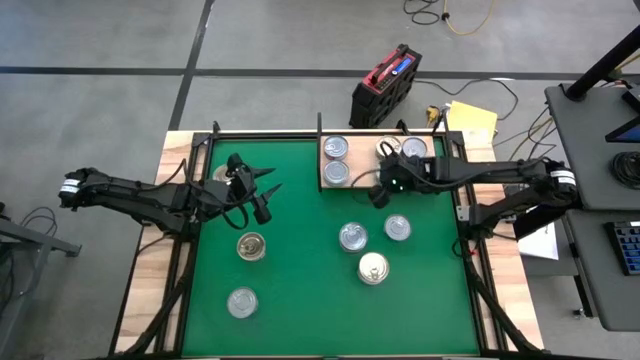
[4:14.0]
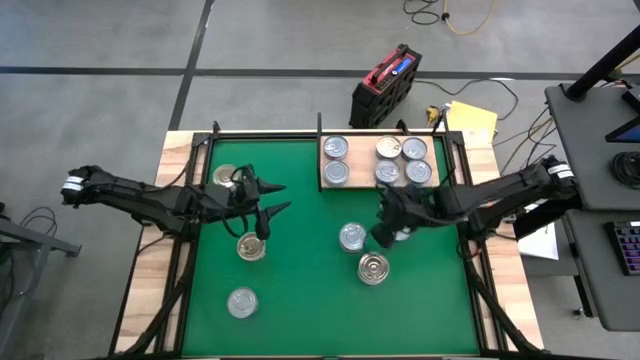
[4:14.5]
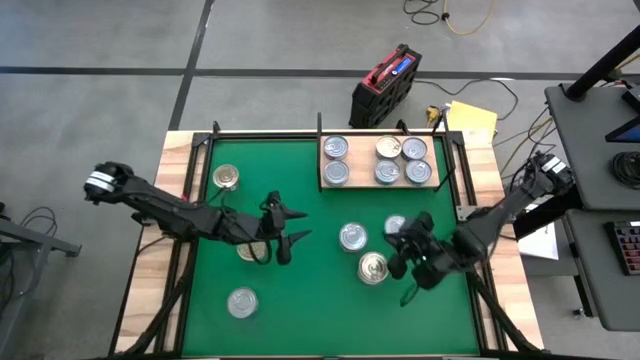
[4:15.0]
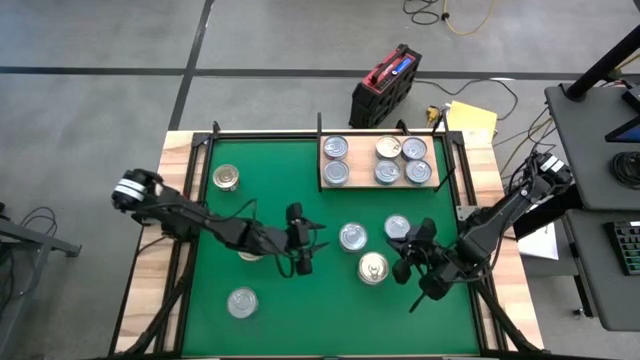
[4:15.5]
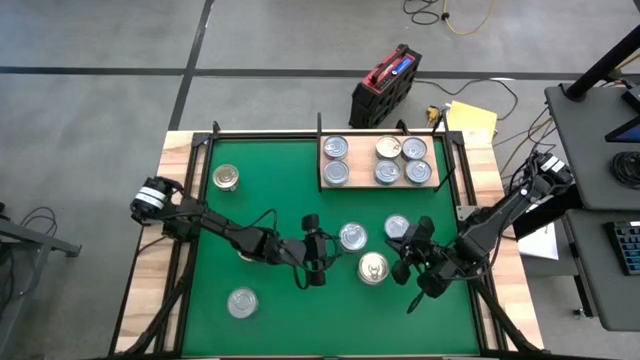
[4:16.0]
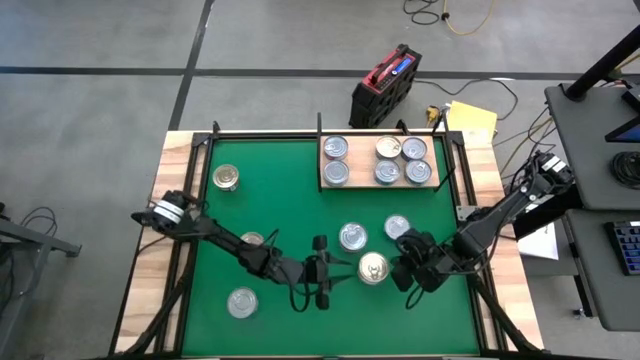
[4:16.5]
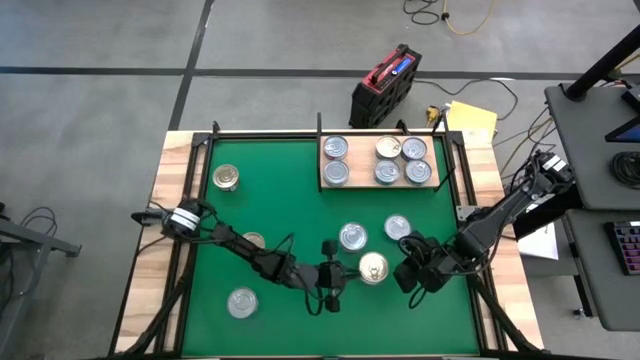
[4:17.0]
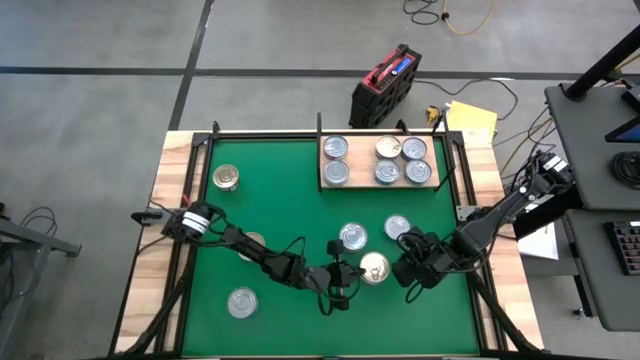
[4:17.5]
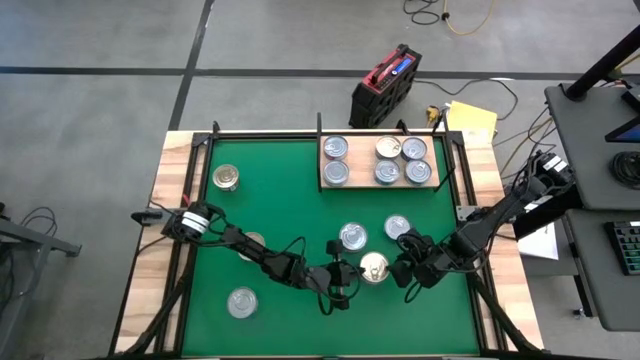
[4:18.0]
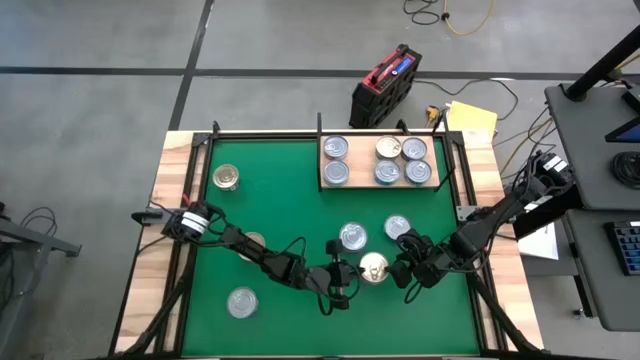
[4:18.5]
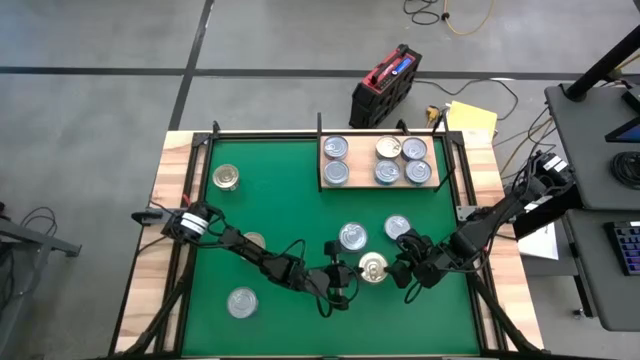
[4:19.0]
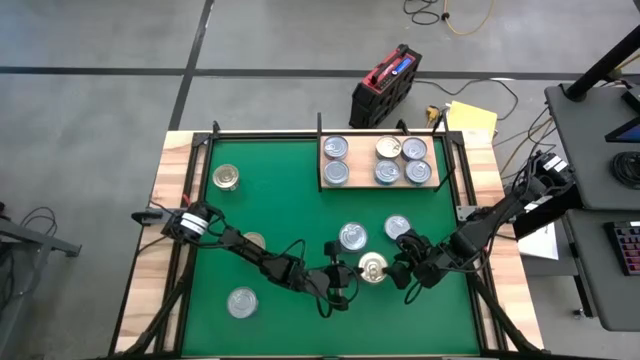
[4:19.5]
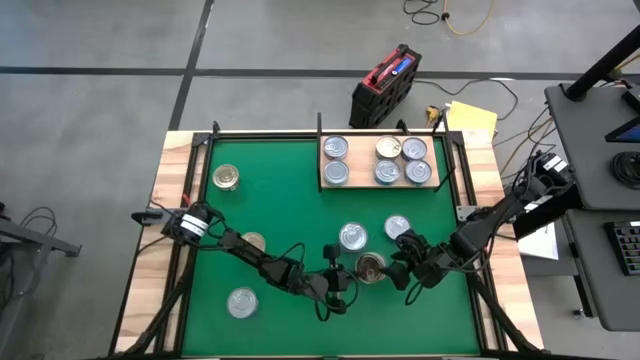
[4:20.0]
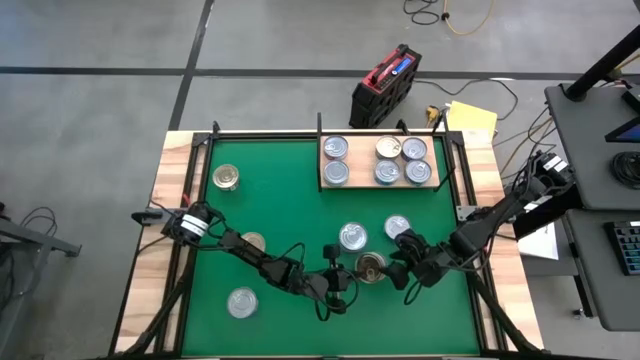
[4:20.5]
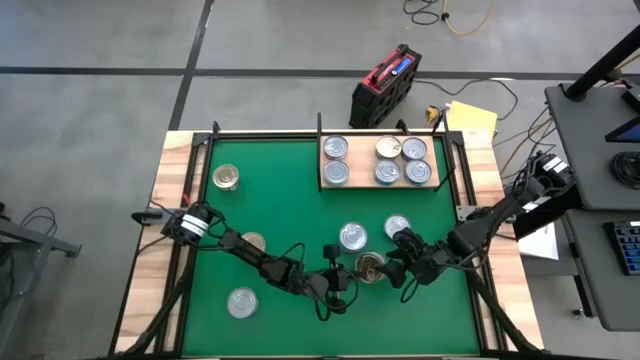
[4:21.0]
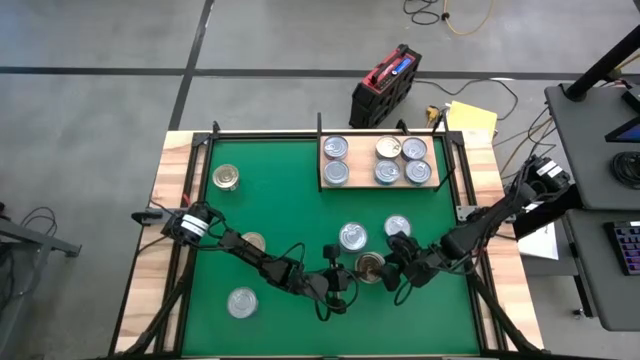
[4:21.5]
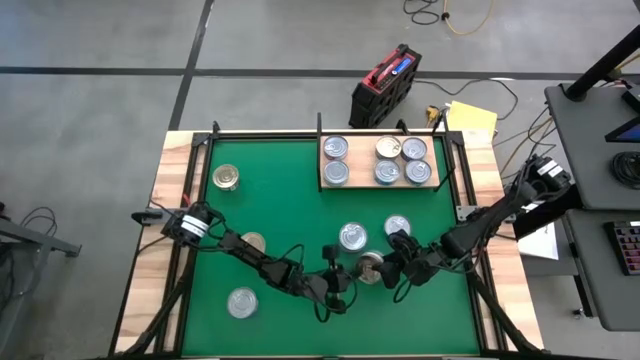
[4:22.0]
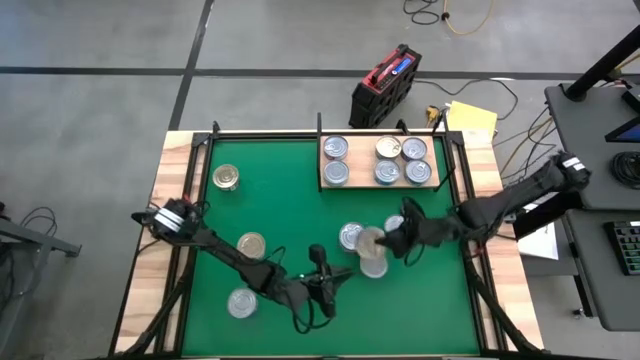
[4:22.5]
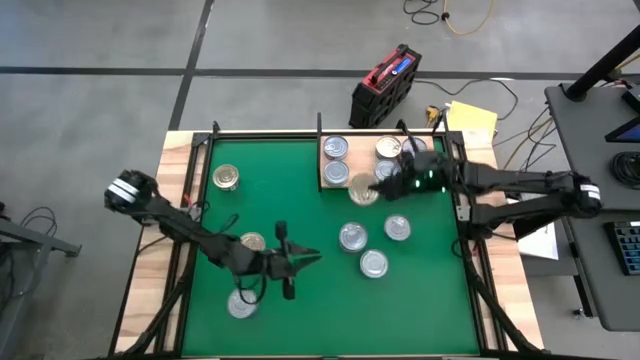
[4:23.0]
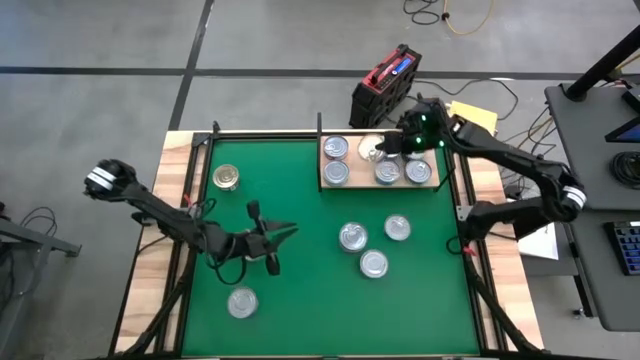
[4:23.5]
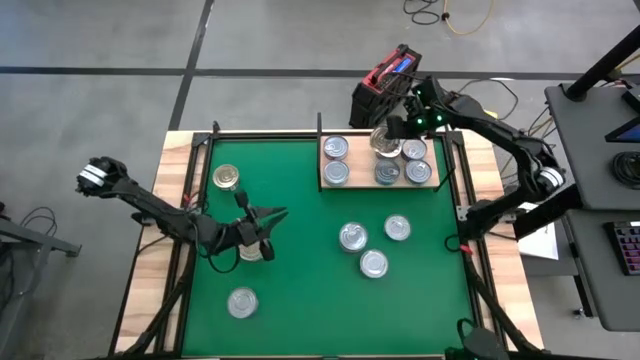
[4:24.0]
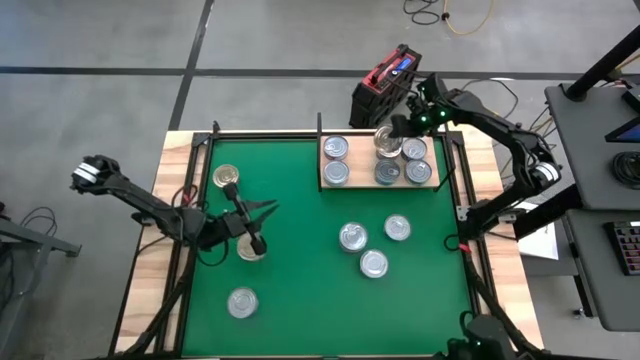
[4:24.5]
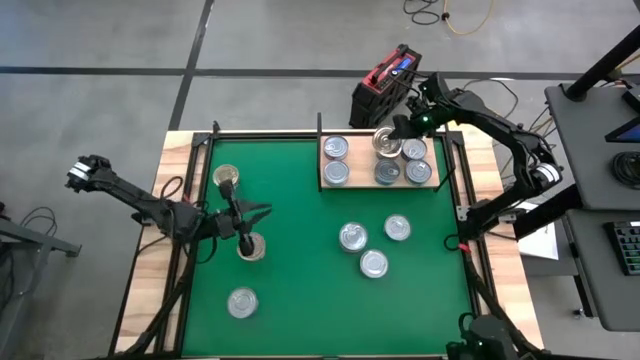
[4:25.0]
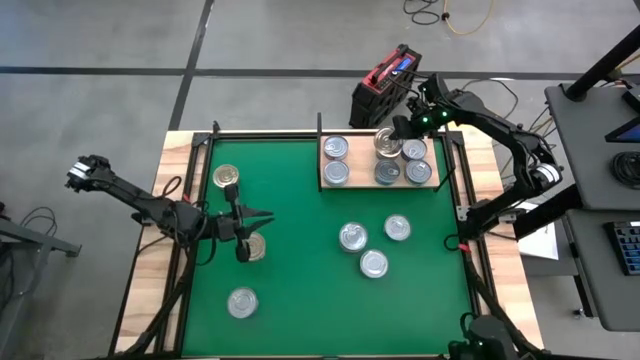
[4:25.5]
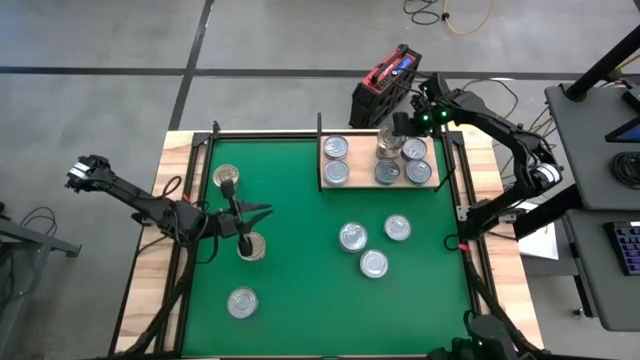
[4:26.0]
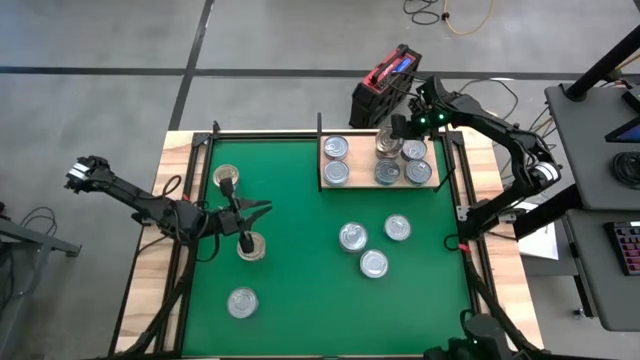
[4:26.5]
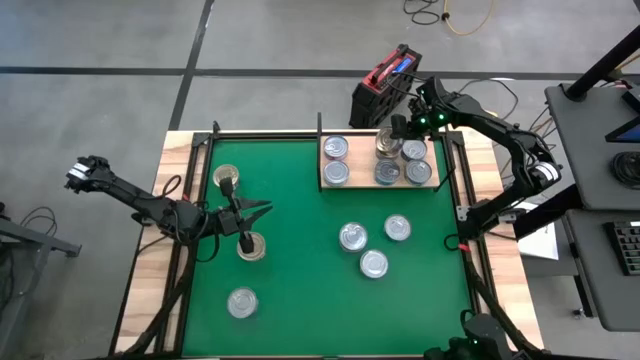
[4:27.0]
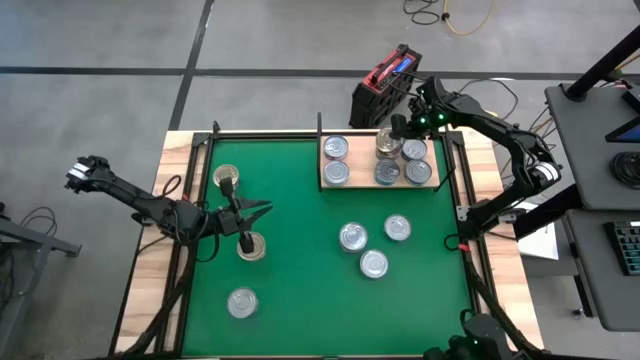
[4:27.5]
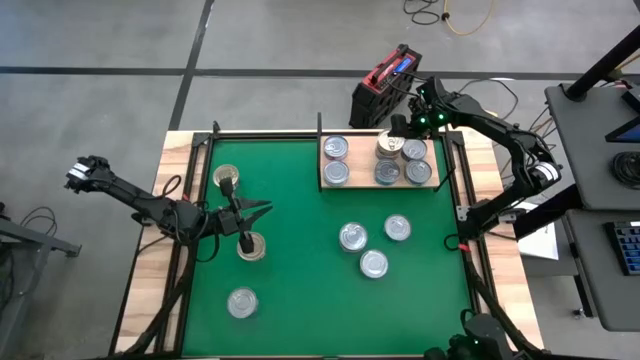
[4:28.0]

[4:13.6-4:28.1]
Task: Stack canned seafood by type on shelf
Stack the blue/pink tuna can on top of the blue/pink tuna can on the shelf

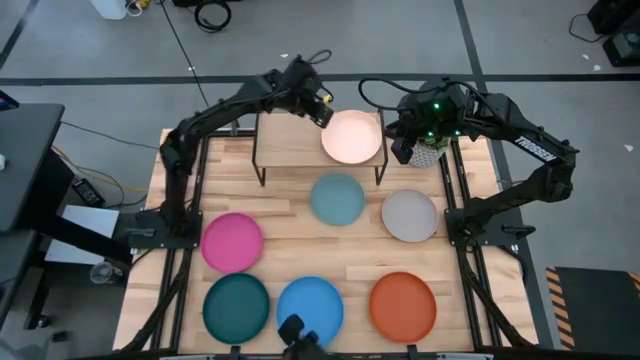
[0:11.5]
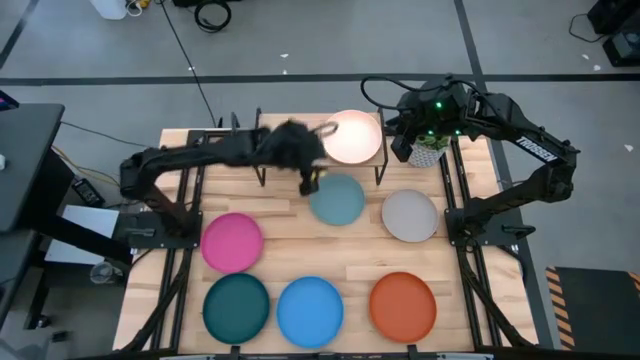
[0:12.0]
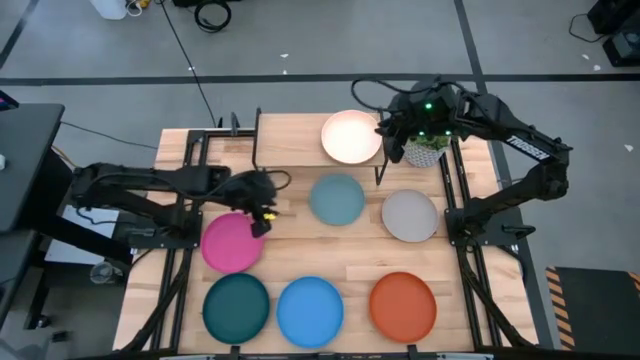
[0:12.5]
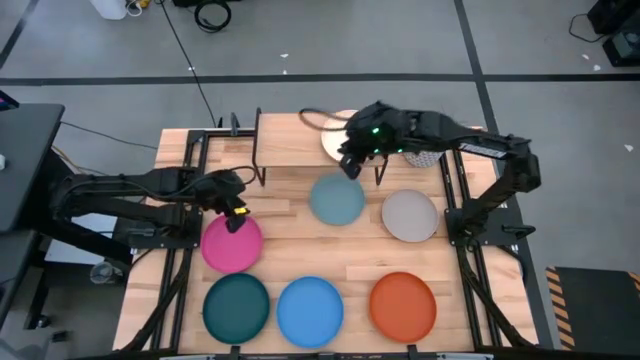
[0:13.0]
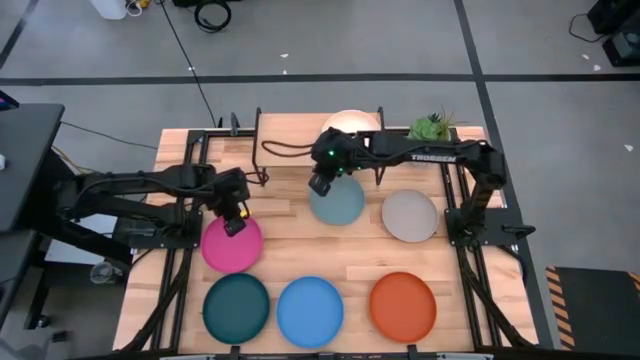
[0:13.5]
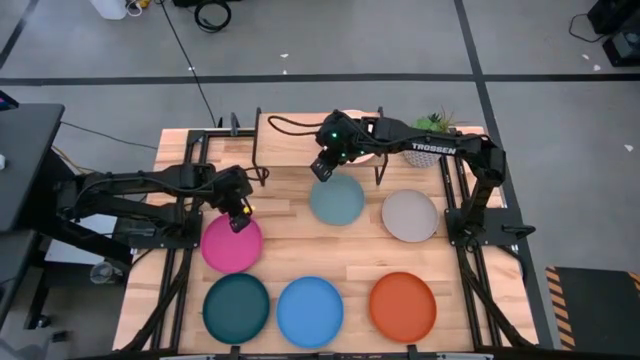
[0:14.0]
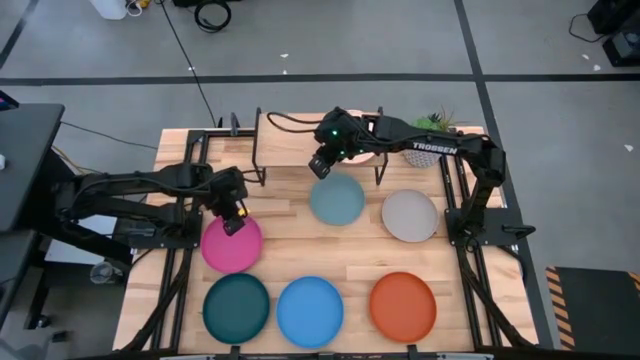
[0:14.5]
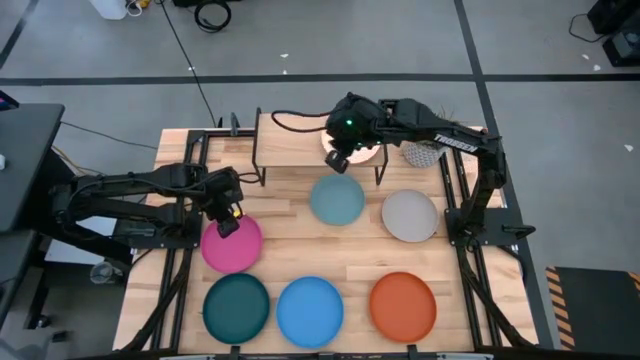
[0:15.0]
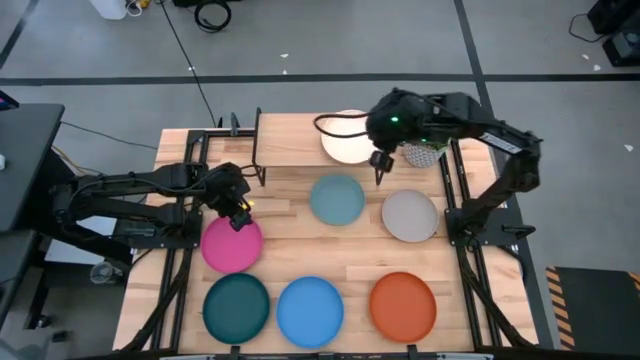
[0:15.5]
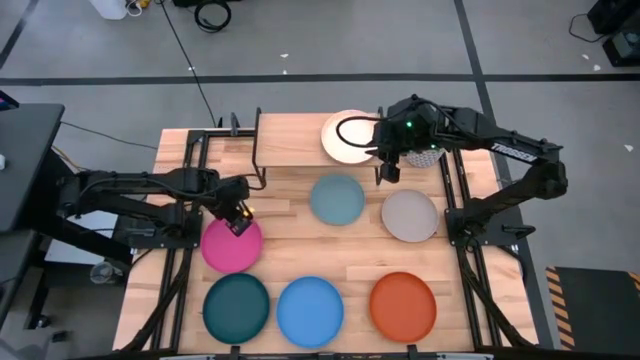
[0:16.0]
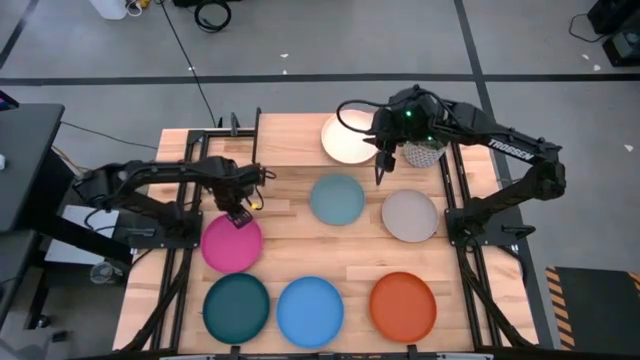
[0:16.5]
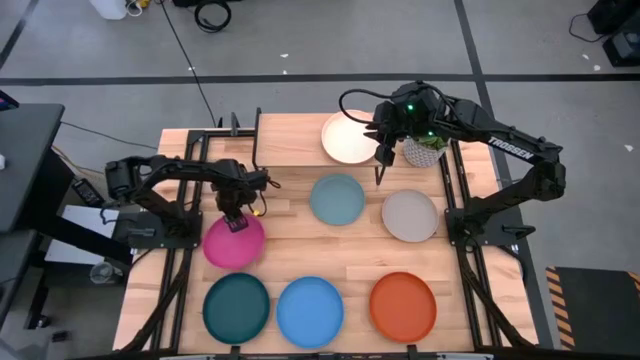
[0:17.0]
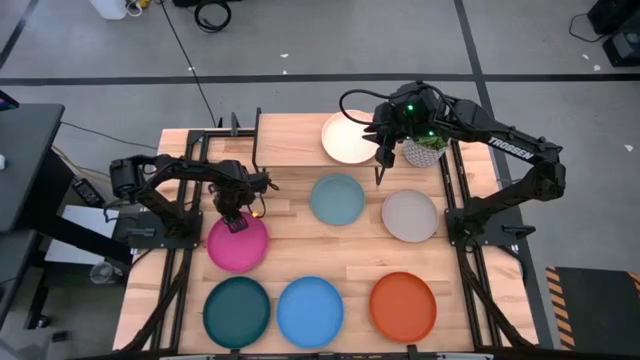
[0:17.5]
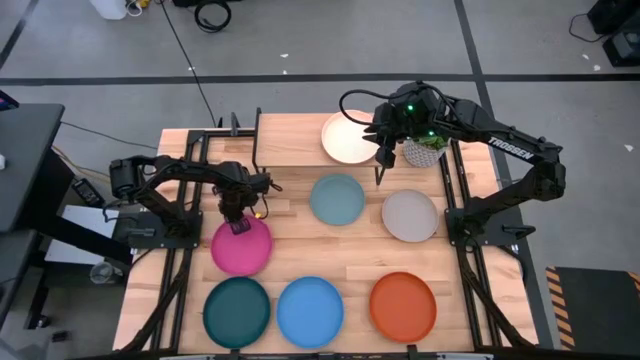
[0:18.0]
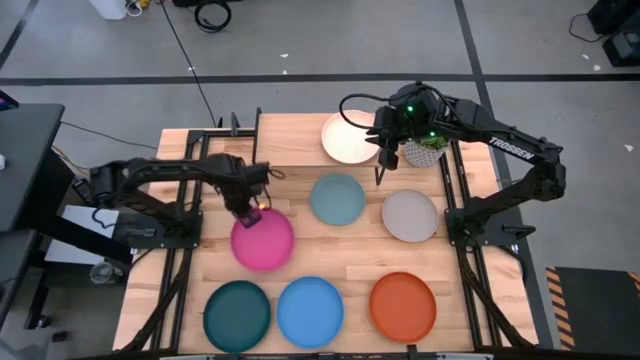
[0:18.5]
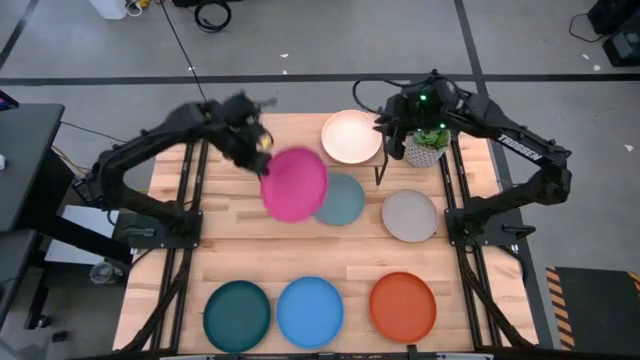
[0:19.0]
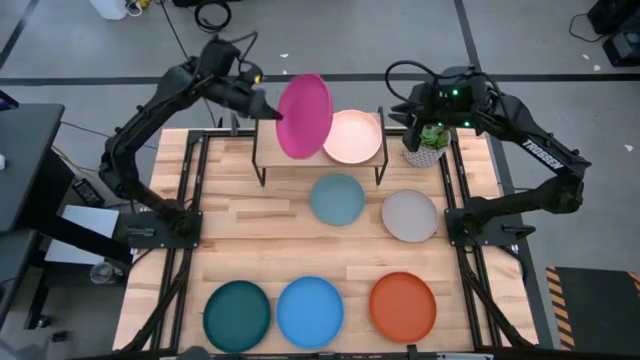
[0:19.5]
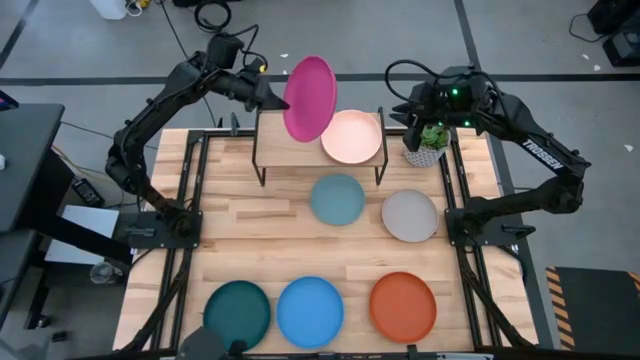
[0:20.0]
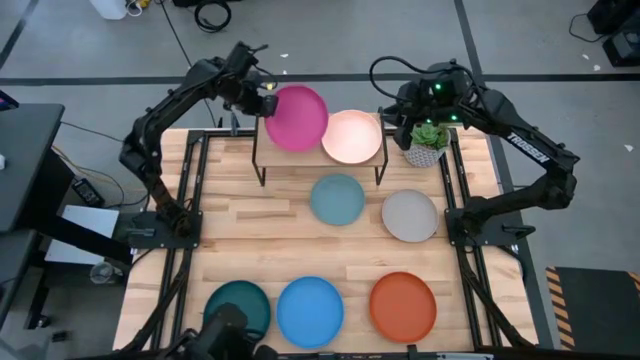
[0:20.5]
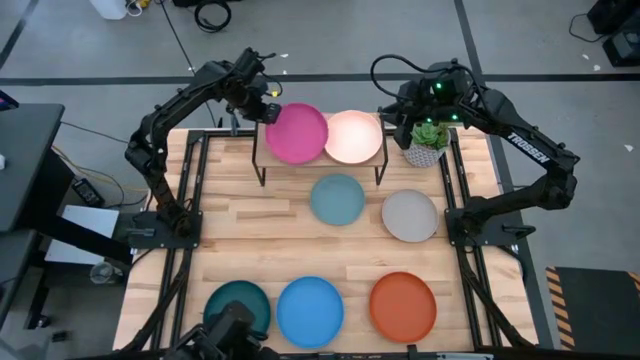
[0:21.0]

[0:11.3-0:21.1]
Task: Place and stack plates onto a shelf
Put the pink plate on the shelf
